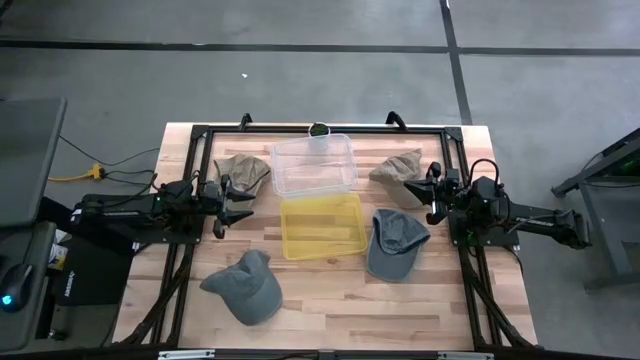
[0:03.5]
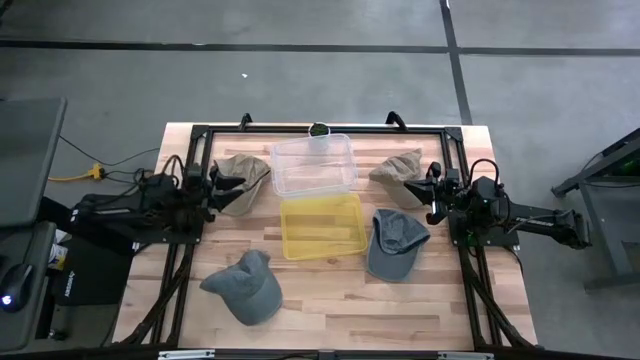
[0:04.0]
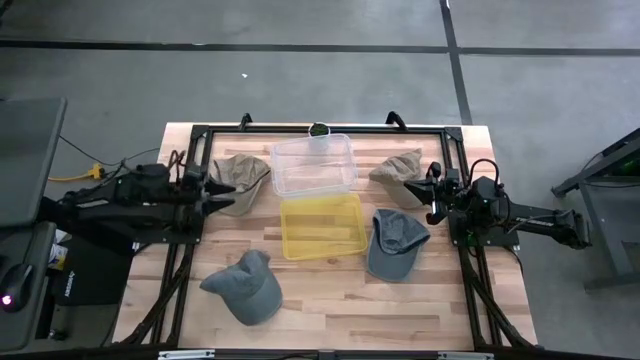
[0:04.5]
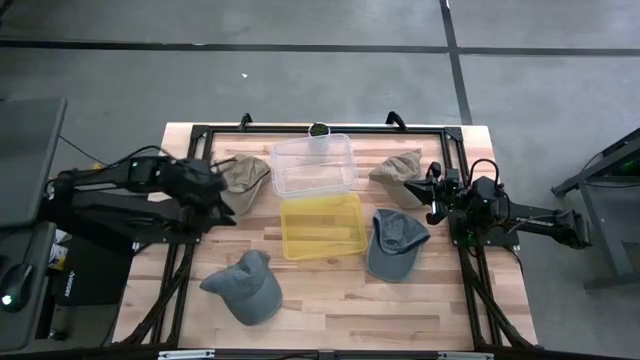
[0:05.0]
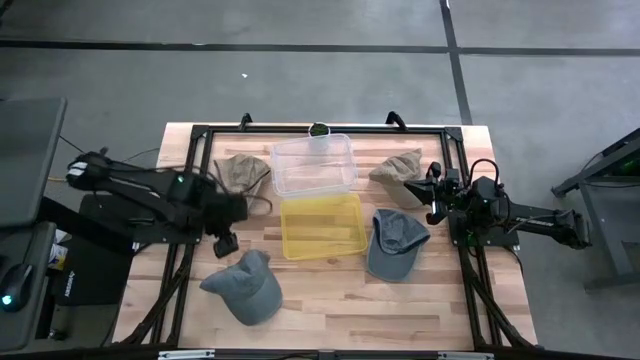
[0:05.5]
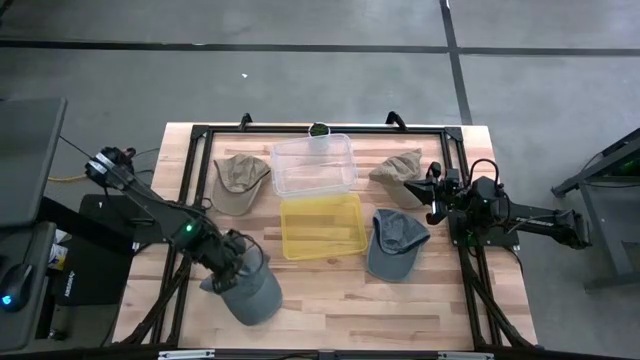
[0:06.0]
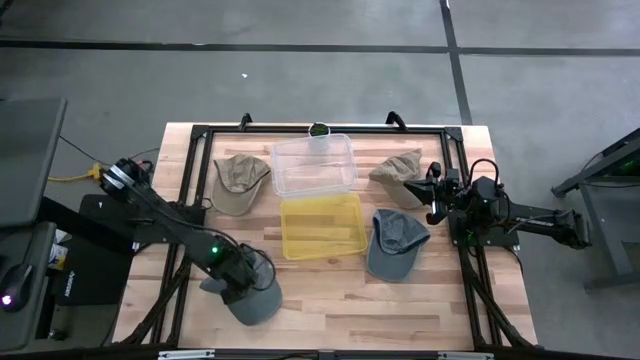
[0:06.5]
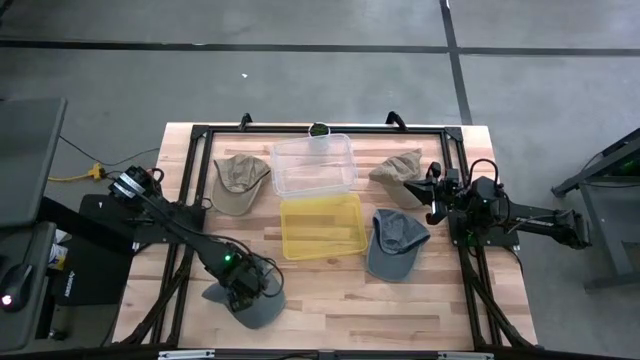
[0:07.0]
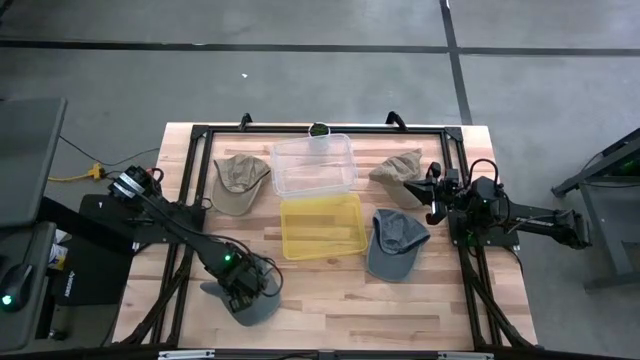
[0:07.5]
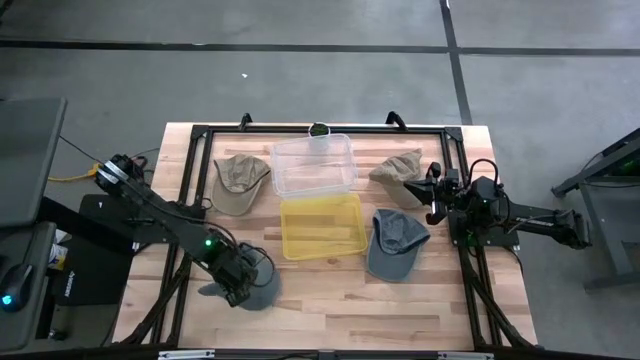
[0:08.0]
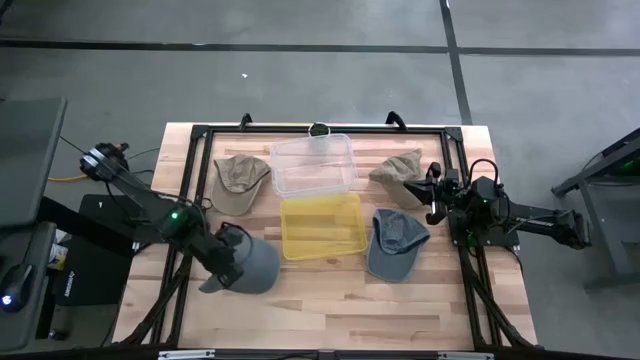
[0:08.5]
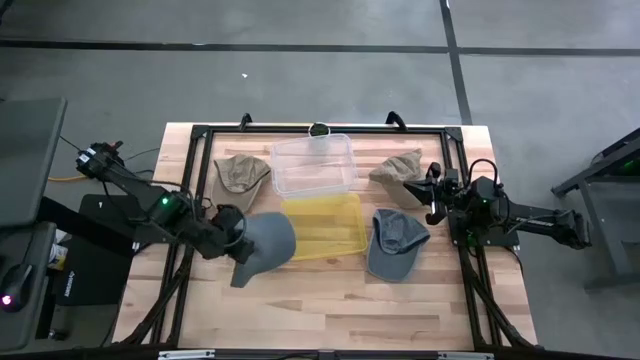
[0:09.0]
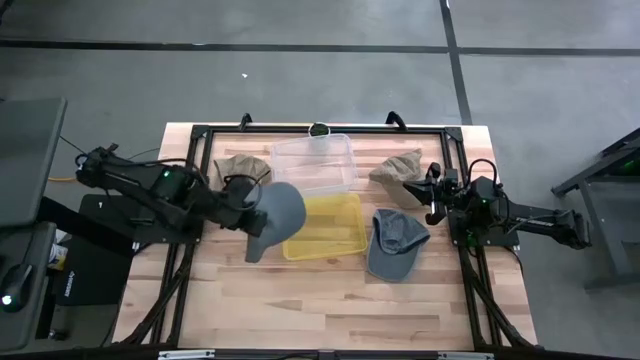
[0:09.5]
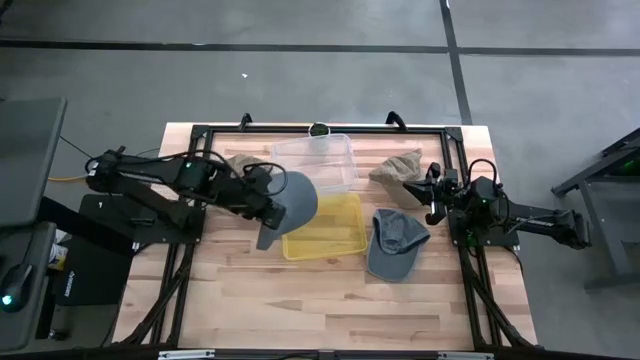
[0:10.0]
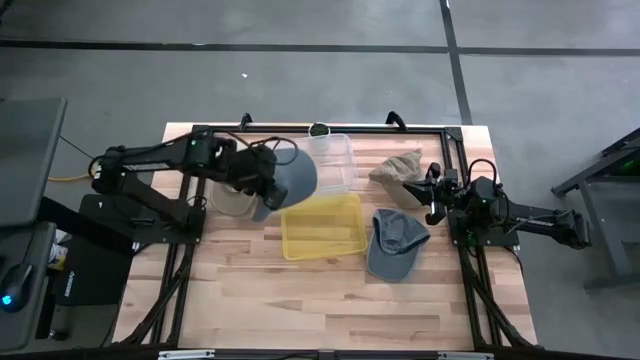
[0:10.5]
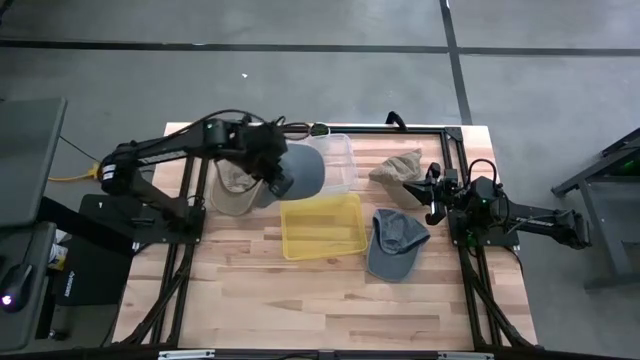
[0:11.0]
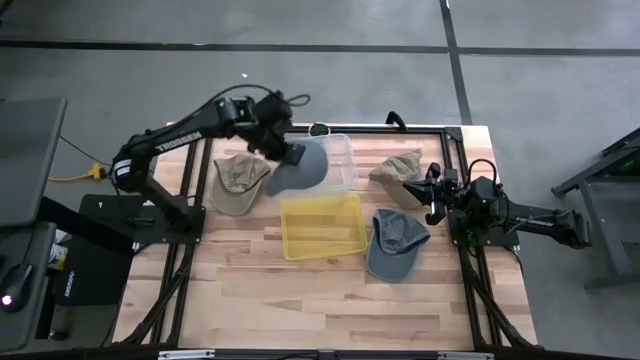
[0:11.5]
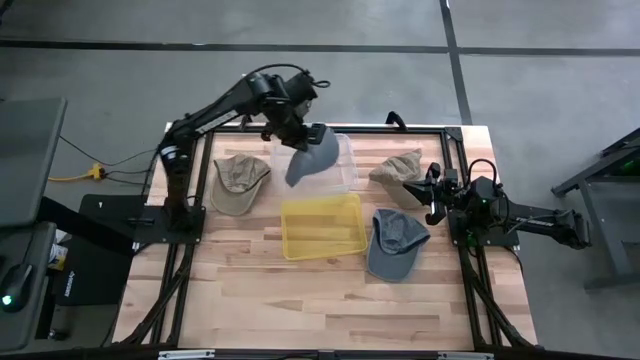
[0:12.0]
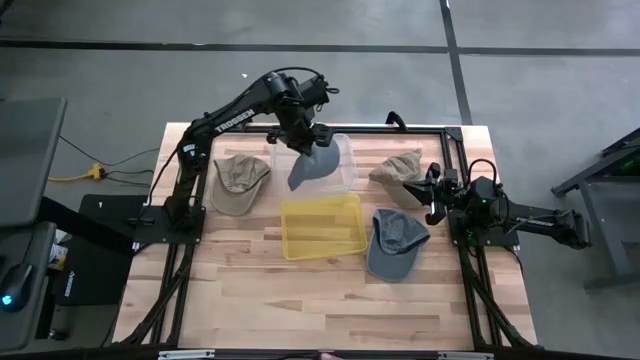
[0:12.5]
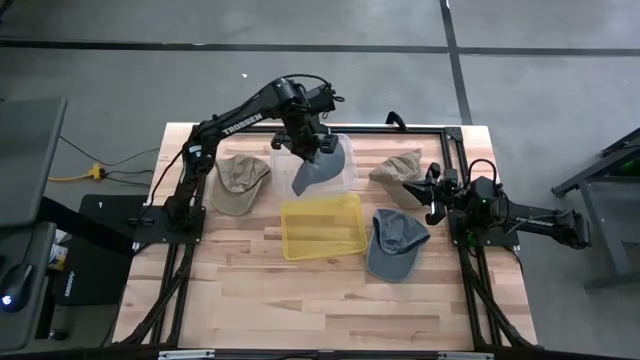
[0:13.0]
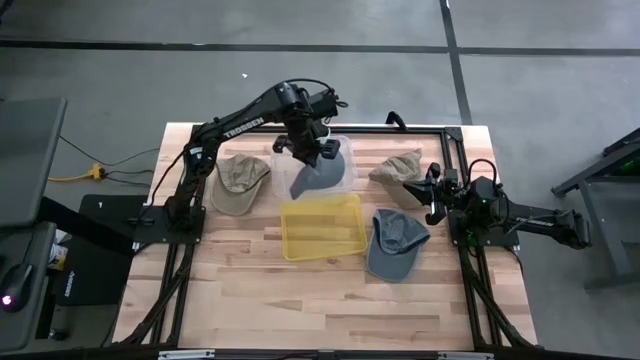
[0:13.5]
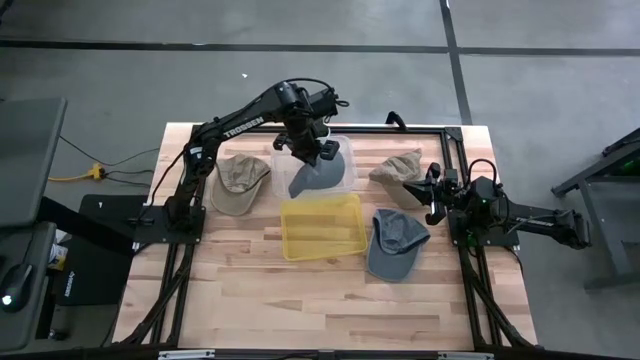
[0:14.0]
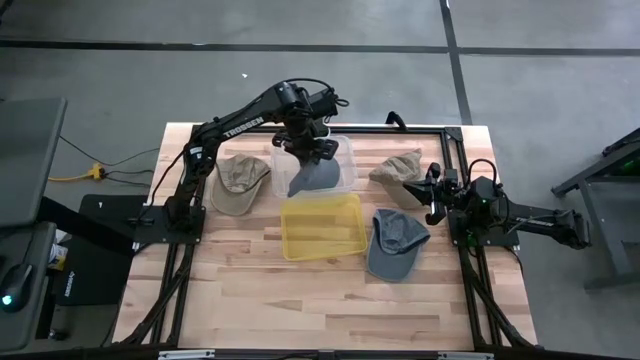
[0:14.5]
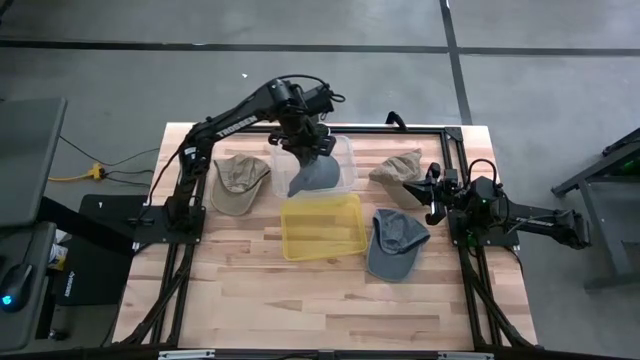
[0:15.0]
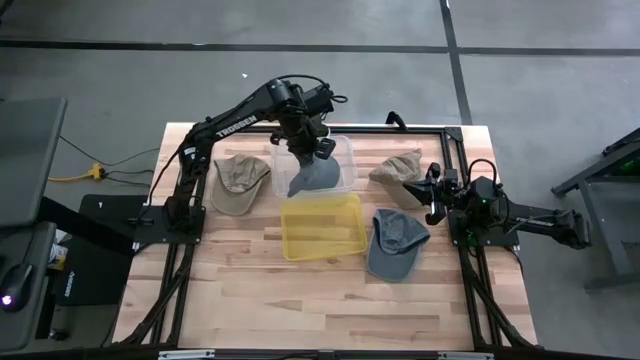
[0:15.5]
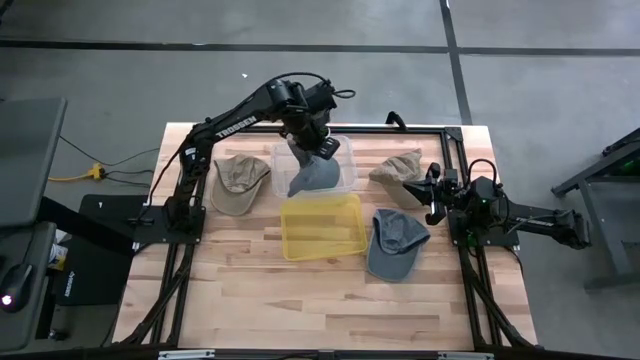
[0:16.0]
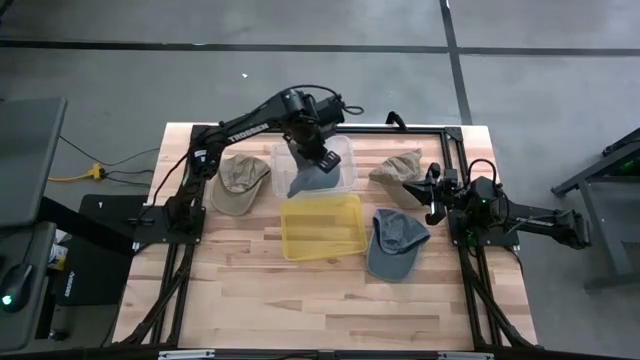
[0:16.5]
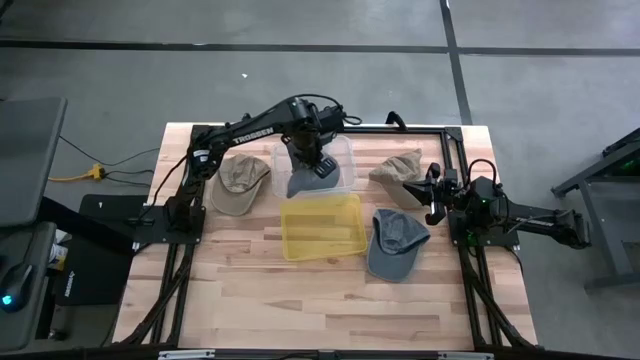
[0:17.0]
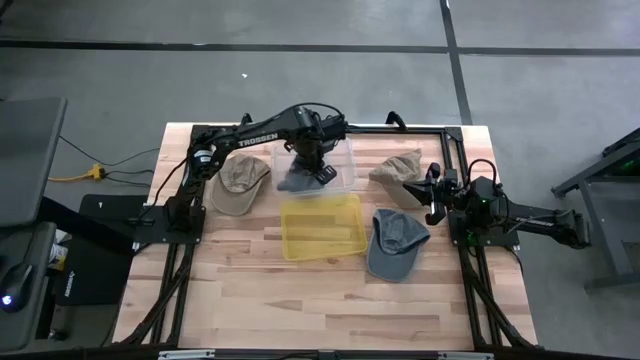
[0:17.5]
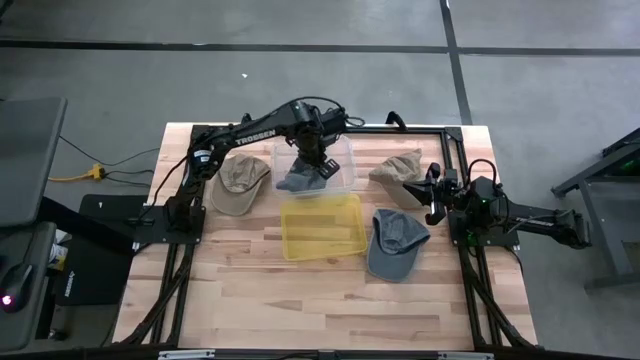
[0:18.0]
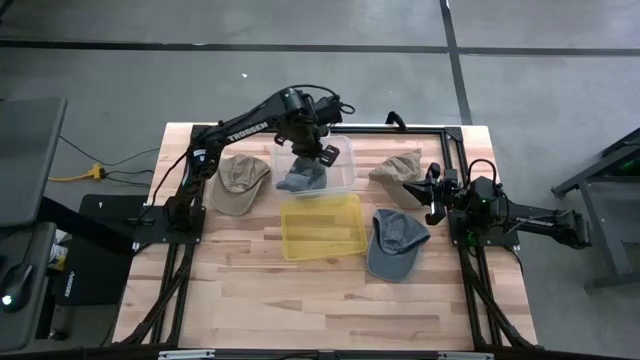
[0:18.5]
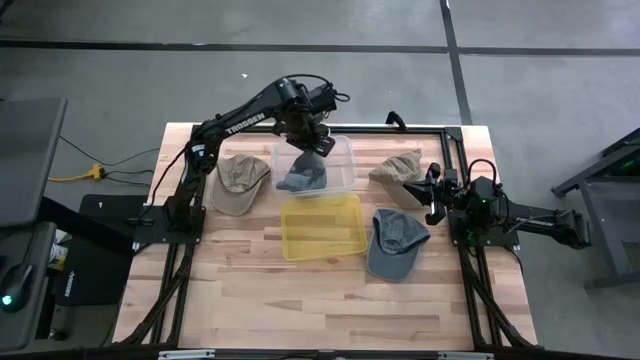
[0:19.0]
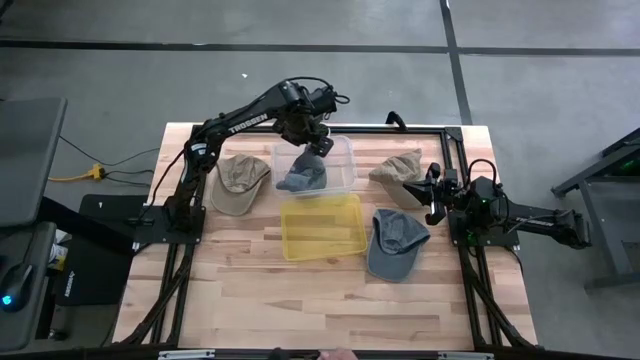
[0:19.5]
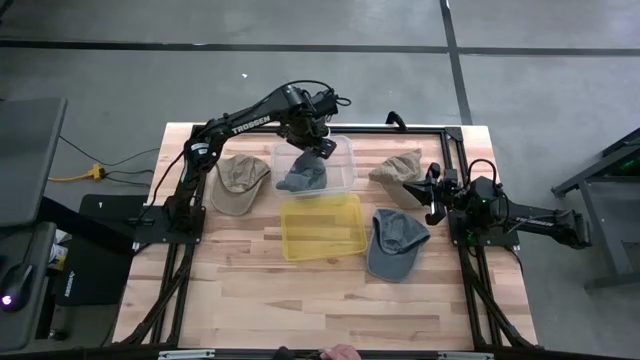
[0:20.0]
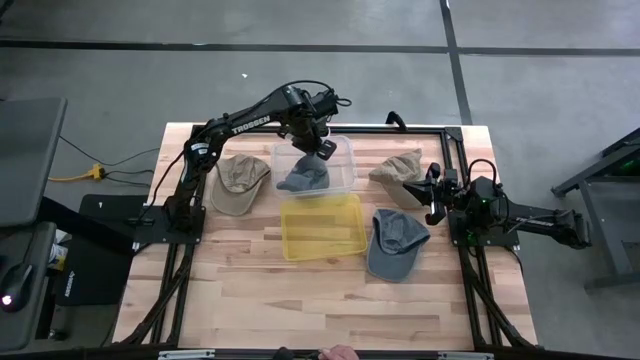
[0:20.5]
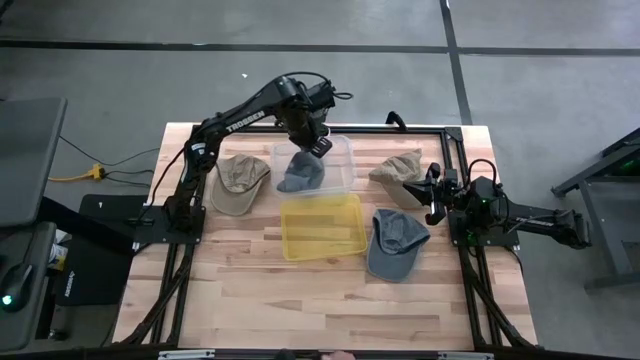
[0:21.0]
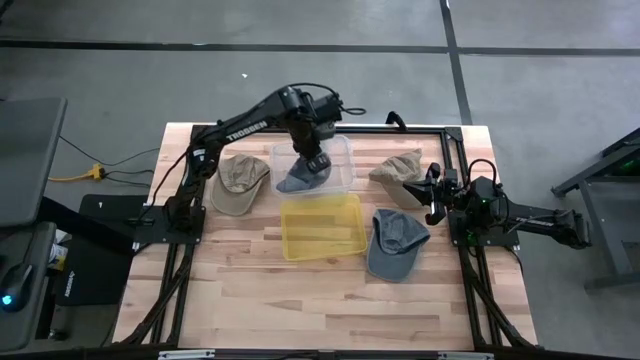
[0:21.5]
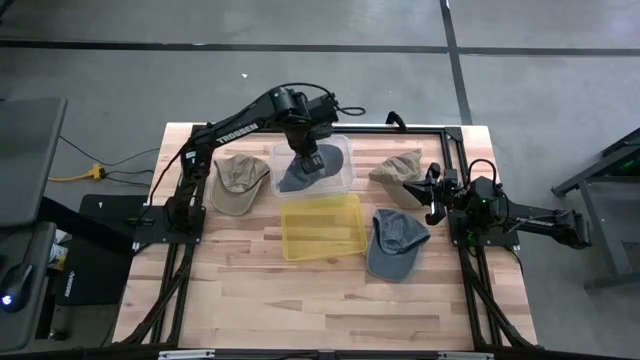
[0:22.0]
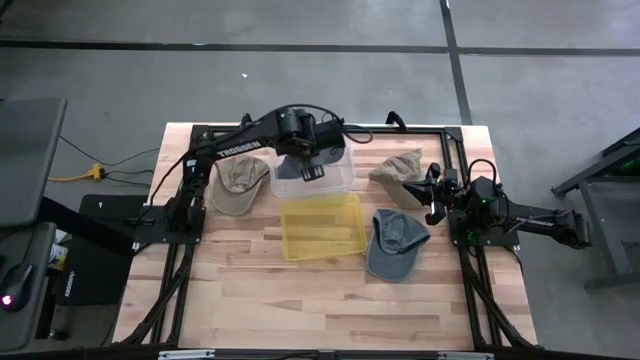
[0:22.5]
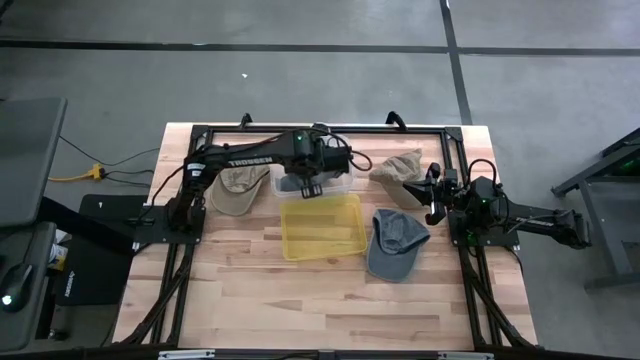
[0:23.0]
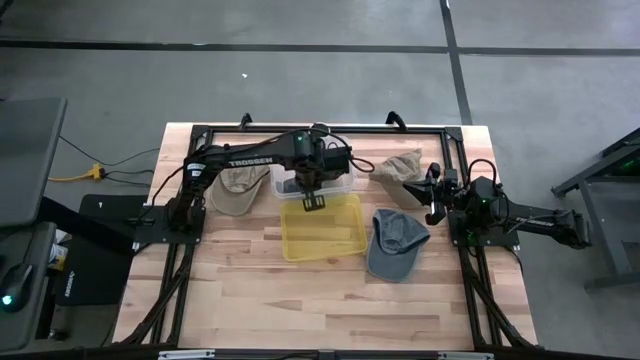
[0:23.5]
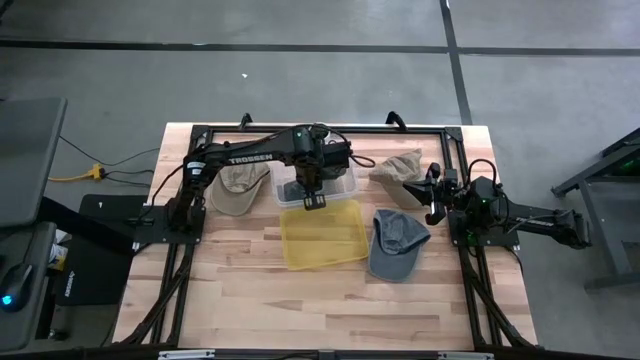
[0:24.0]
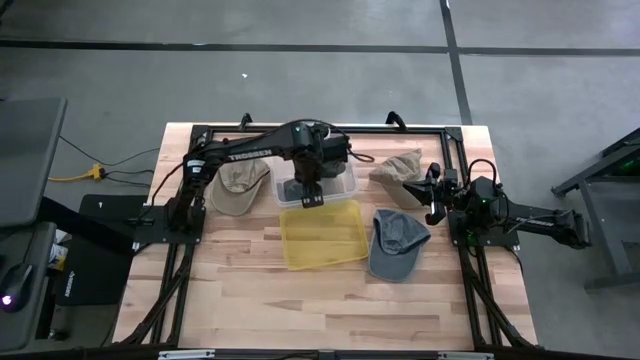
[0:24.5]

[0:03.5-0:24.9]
Task: Pick & Place hat
Put the bottom gray cap into the transparent bin
